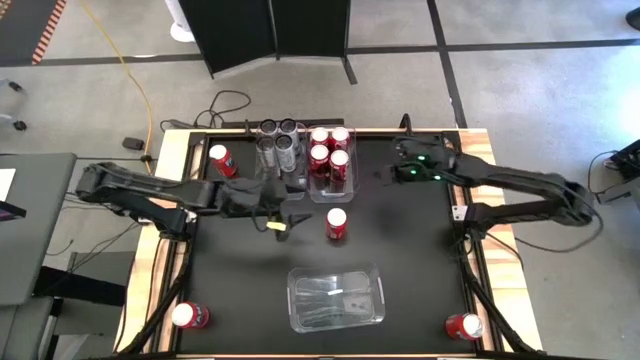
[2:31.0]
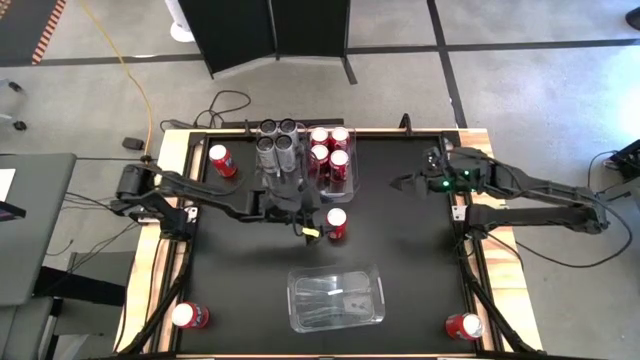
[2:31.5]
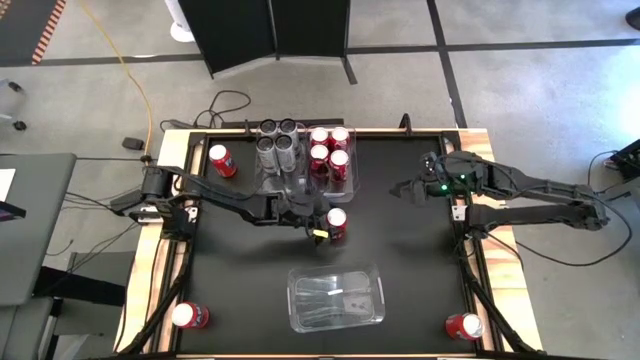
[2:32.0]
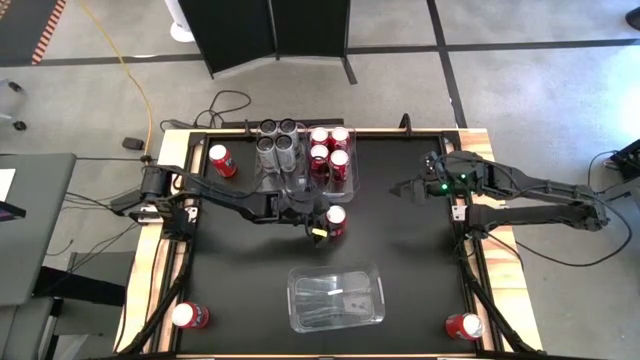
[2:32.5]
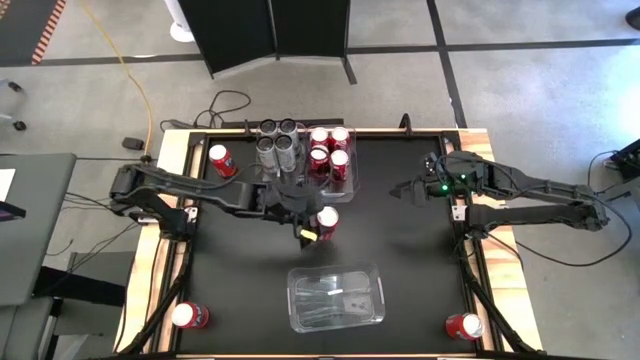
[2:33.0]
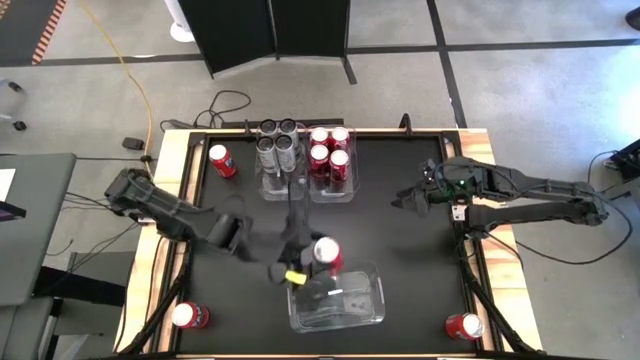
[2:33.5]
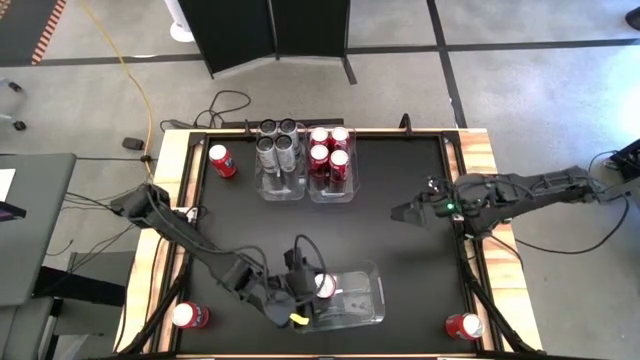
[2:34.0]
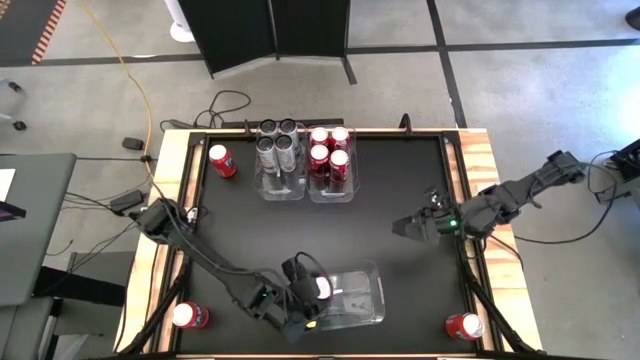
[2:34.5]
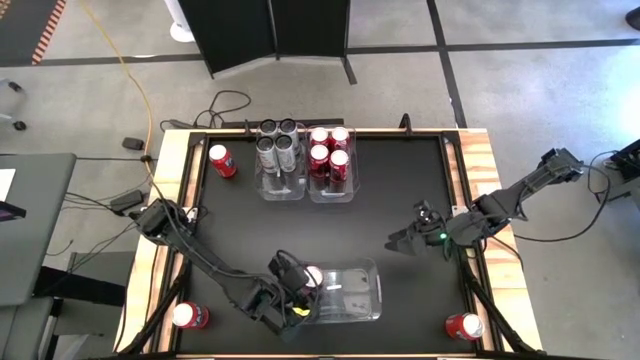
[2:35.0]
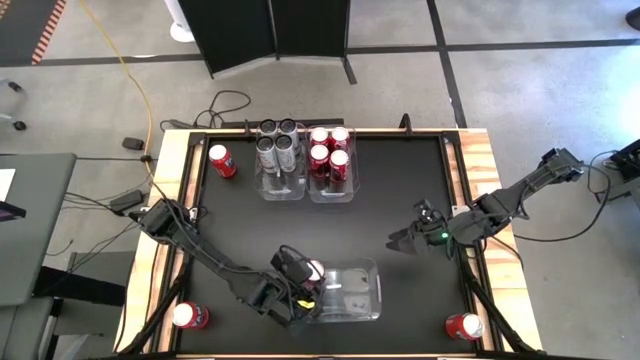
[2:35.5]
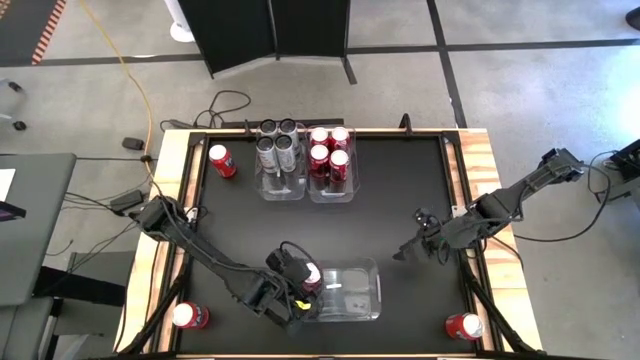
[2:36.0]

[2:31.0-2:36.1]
Task: Sort soda cans
Put the middle orange soda can into the bottom transparent bin

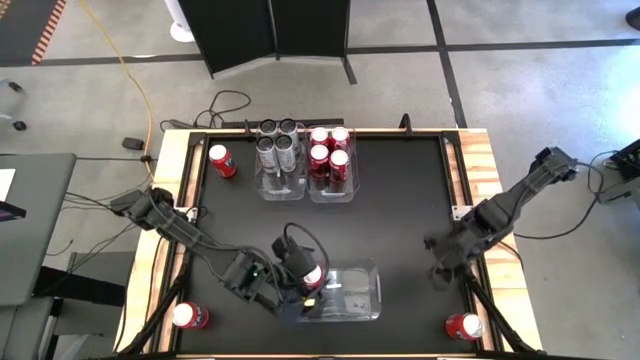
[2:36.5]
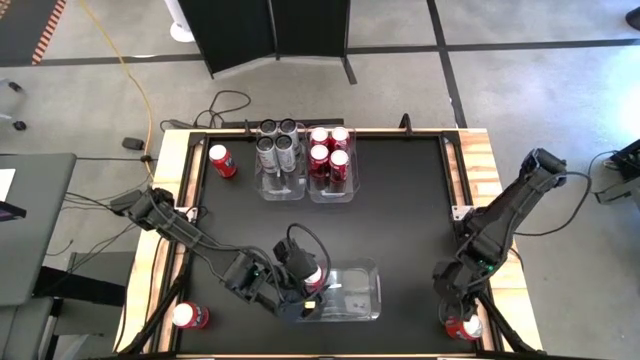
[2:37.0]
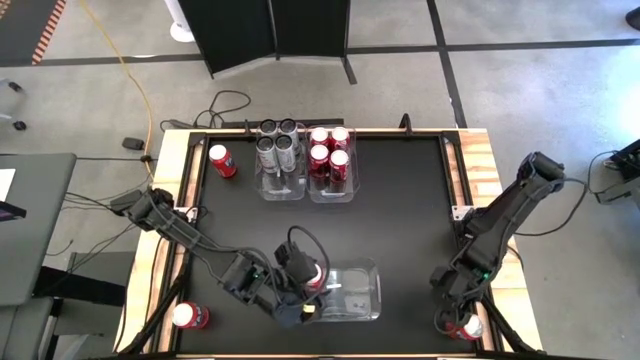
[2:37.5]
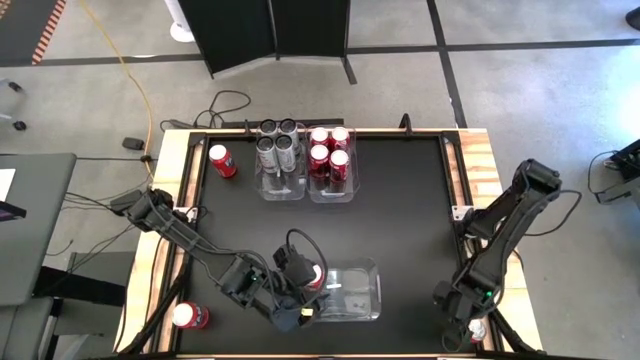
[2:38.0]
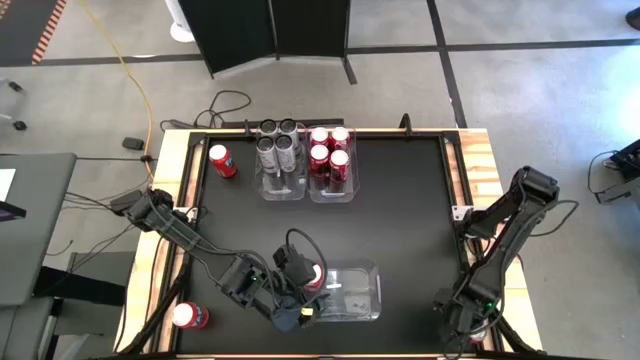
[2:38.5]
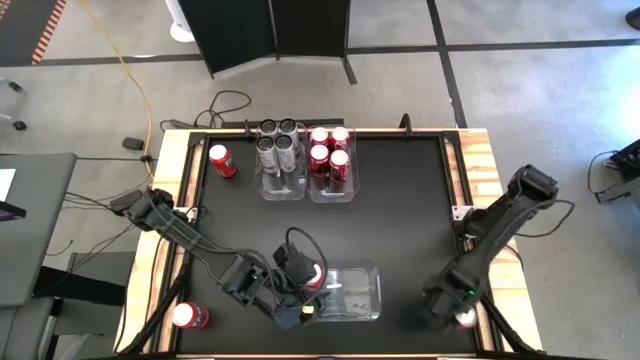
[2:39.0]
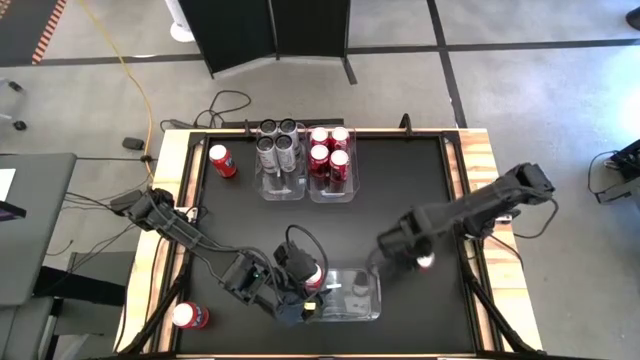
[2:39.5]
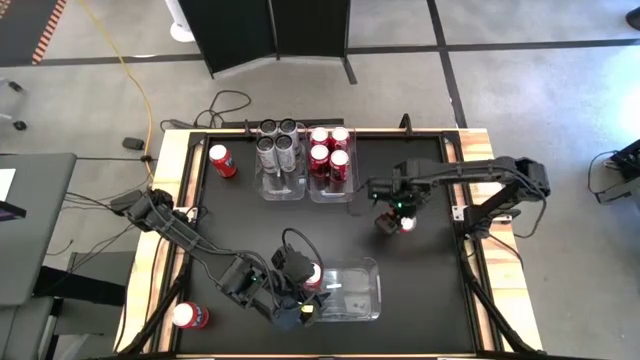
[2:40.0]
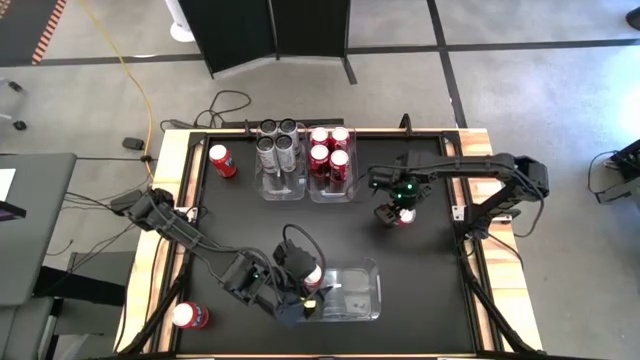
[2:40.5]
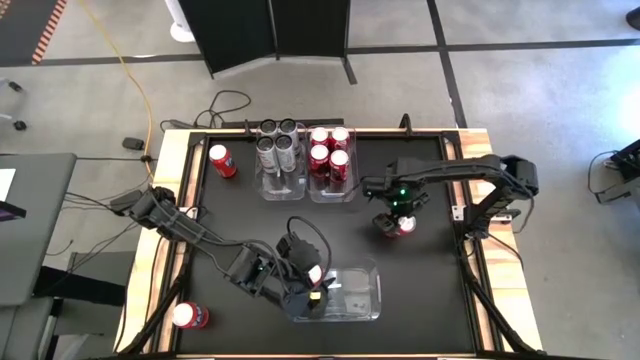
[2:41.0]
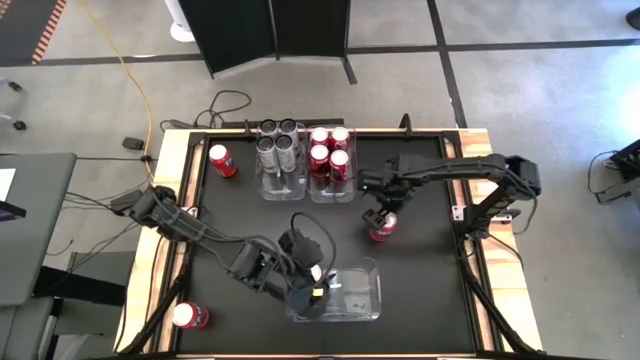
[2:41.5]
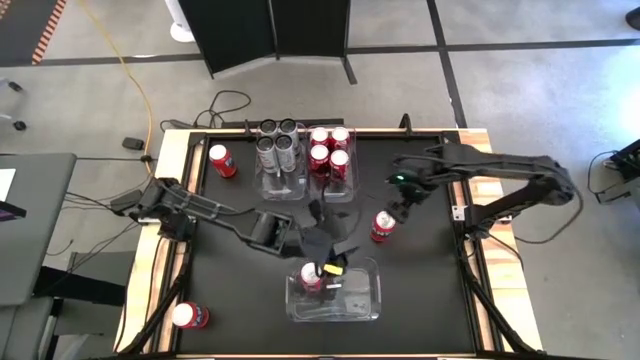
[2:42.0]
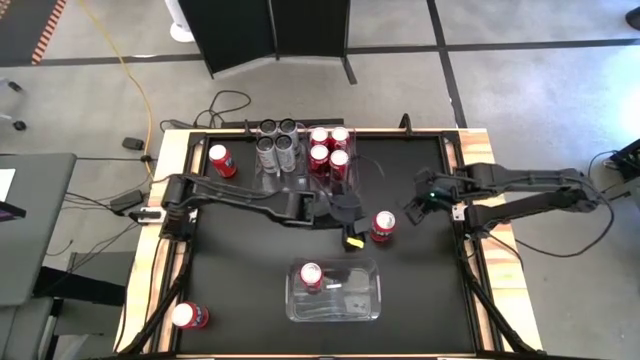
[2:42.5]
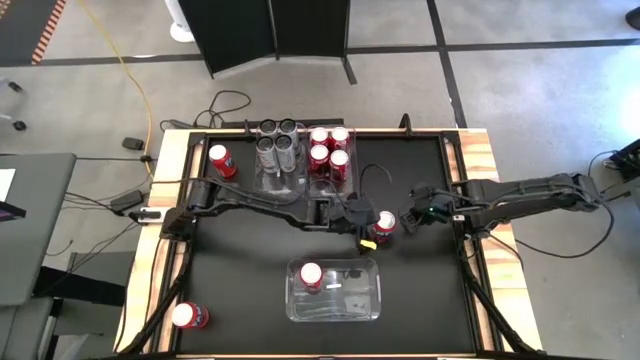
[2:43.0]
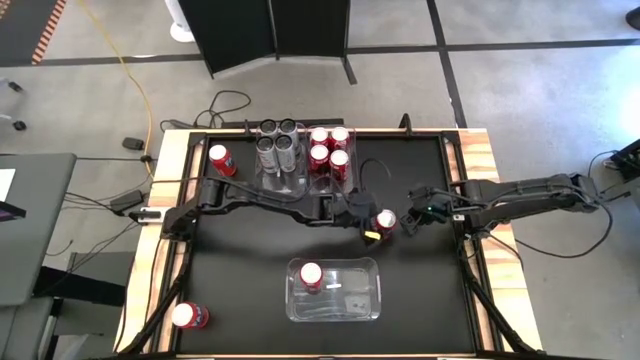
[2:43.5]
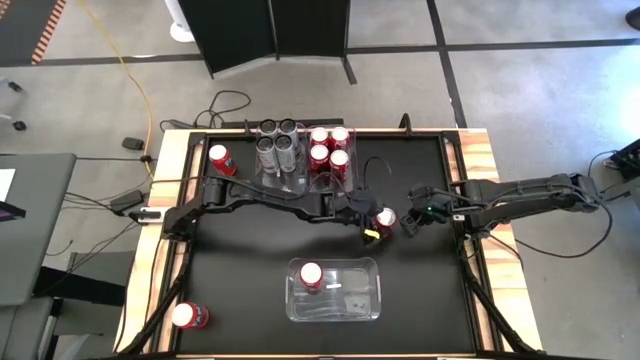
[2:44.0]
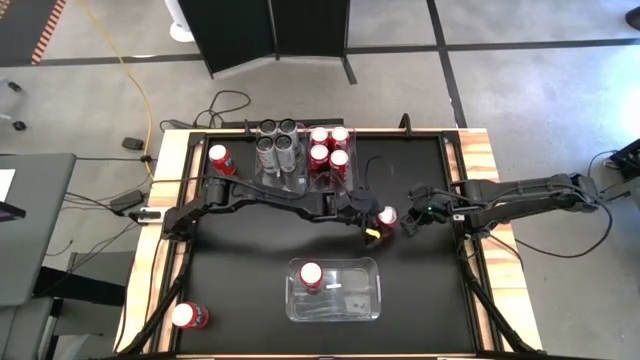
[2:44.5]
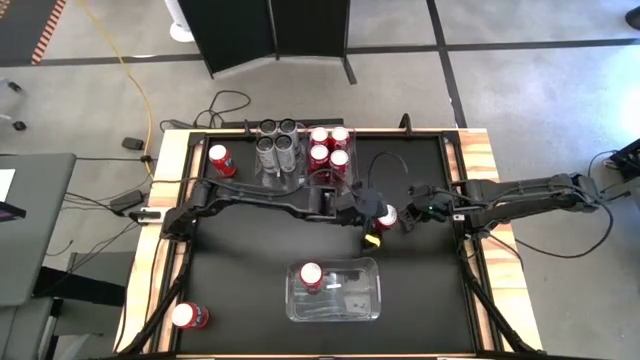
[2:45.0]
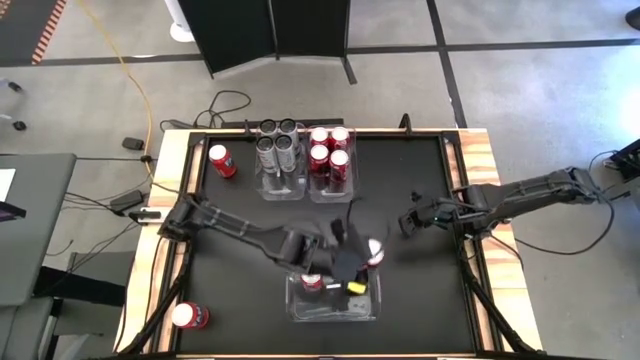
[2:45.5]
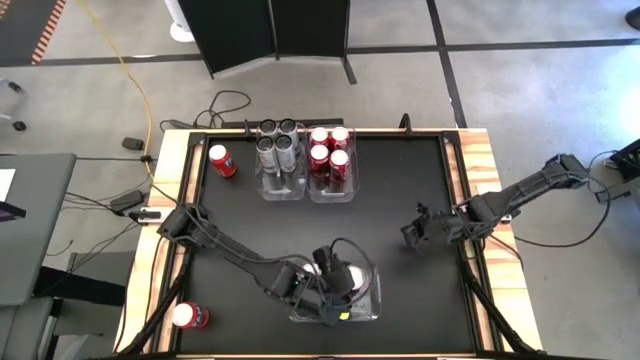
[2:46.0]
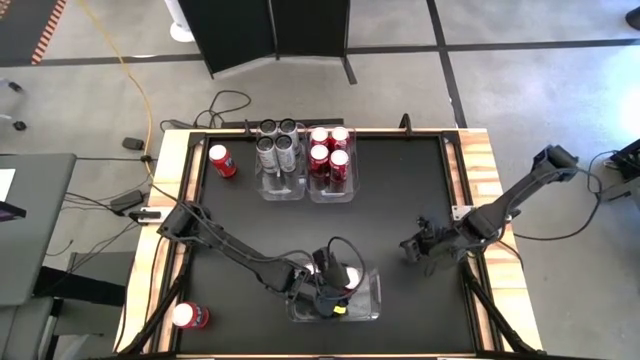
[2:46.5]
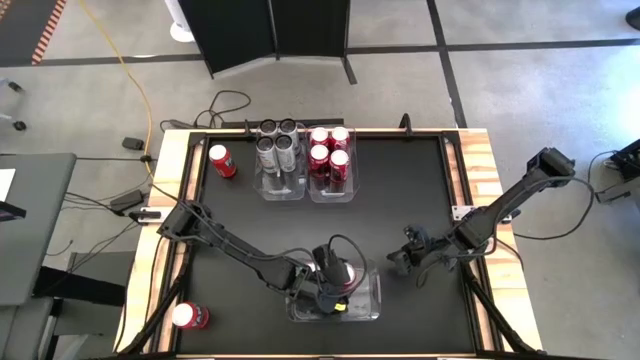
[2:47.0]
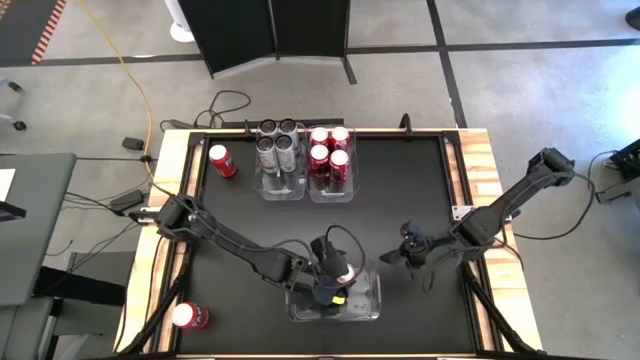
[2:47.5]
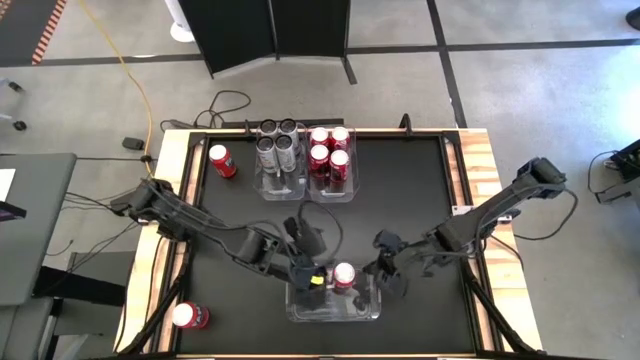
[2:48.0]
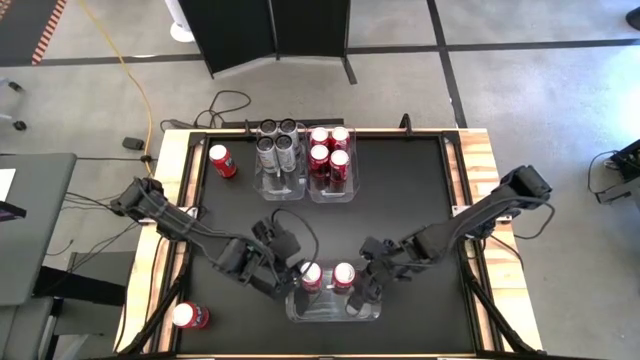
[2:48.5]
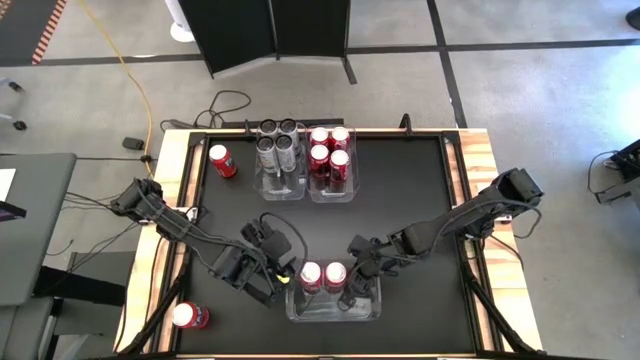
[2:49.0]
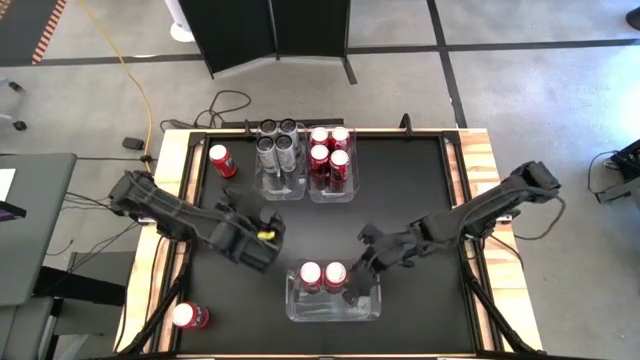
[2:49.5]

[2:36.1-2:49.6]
Put the bottom right orange soda can into the bottom transparent bin

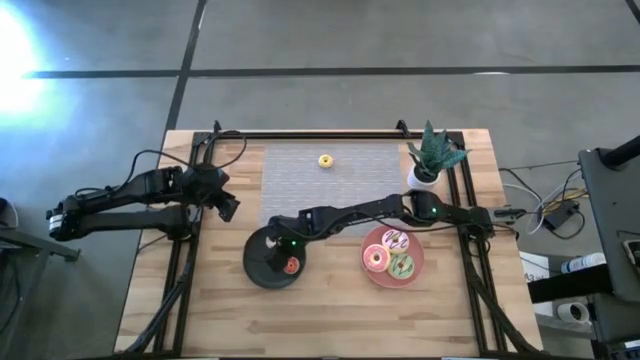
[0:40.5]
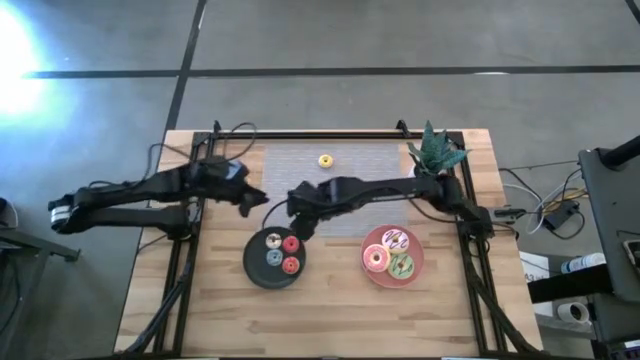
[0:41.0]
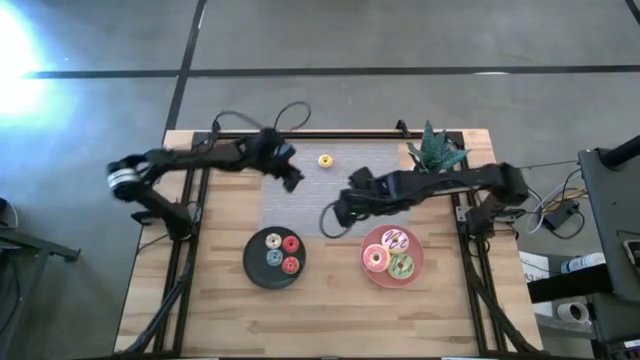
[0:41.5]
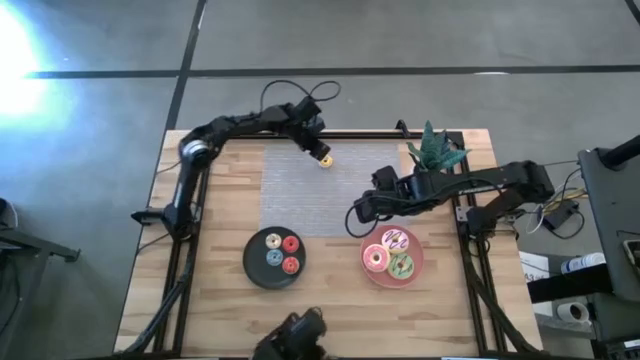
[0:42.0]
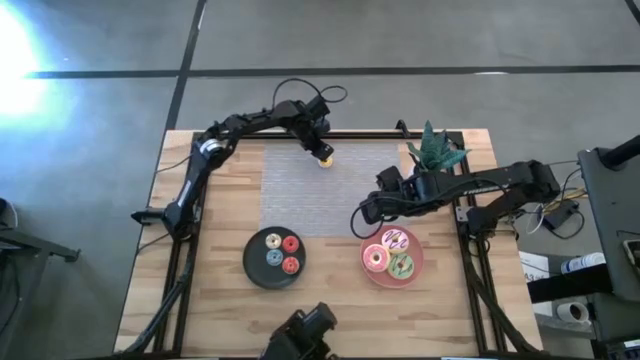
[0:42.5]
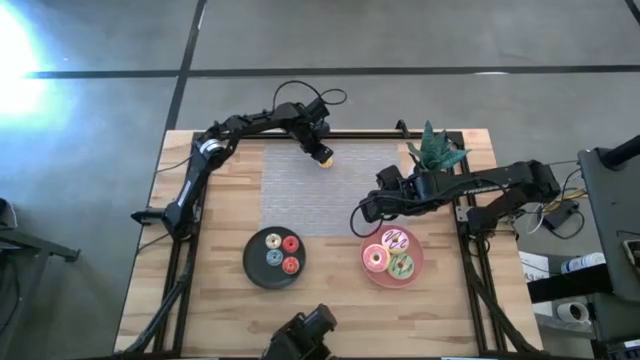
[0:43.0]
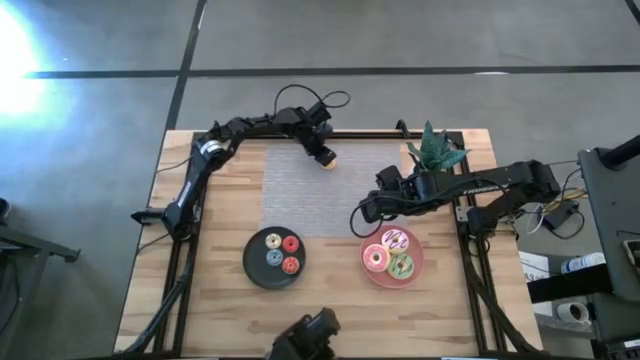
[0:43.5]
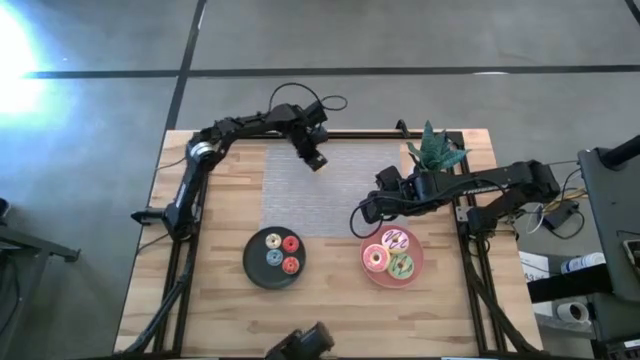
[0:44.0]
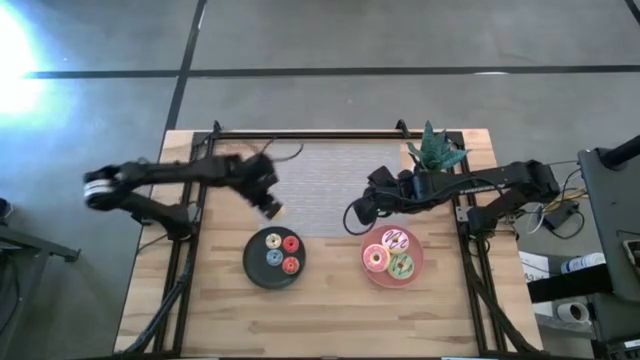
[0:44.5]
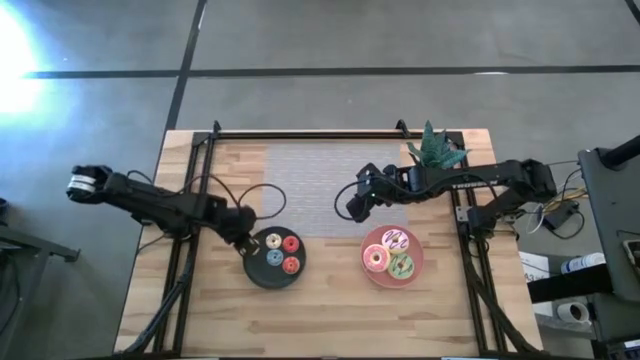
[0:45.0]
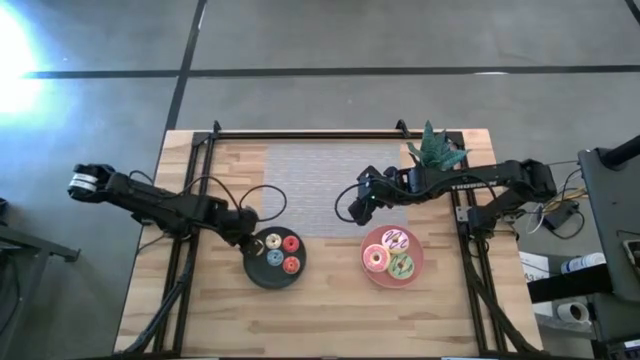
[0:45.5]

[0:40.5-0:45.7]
Task: Pick & Place donuts
Put the small yellow donut on the black plate
